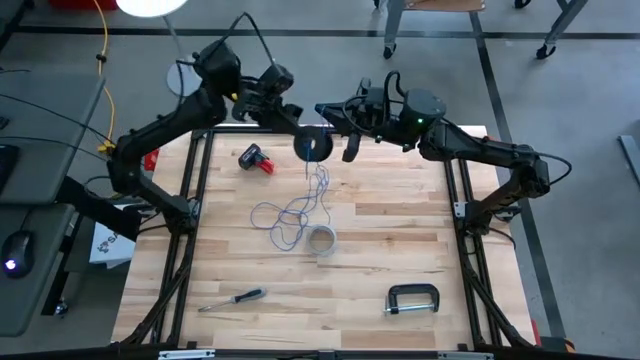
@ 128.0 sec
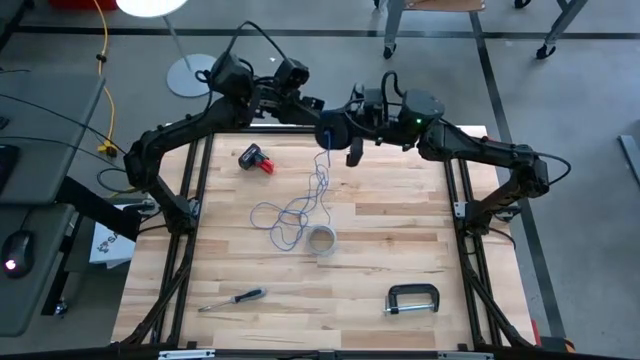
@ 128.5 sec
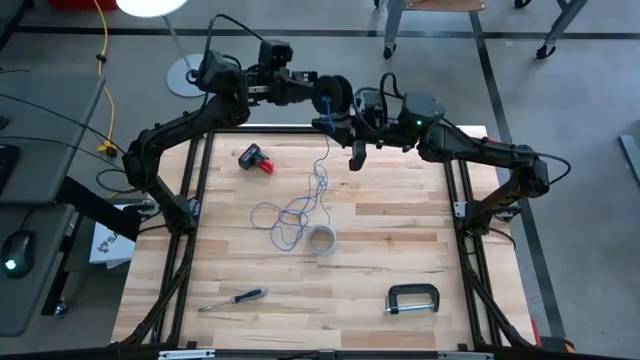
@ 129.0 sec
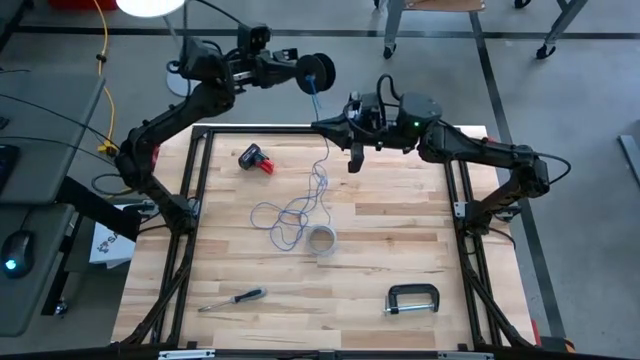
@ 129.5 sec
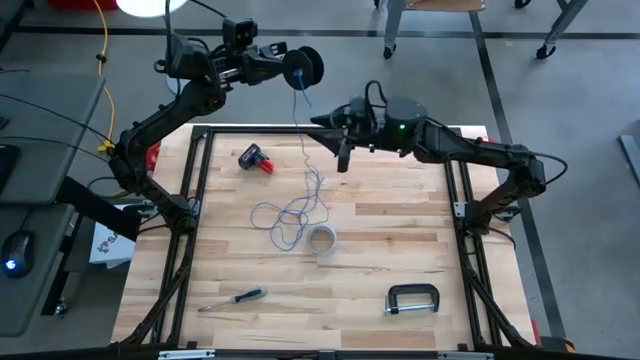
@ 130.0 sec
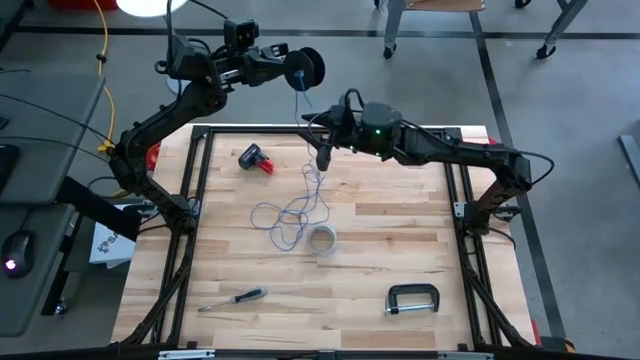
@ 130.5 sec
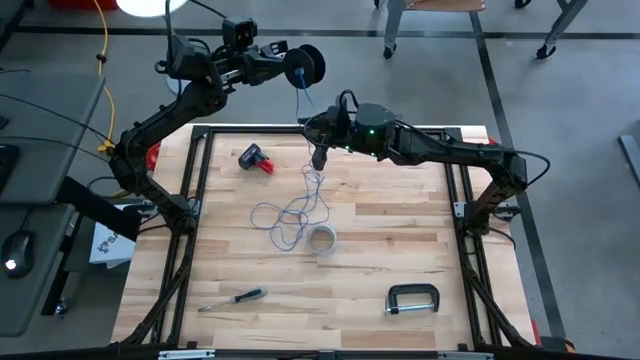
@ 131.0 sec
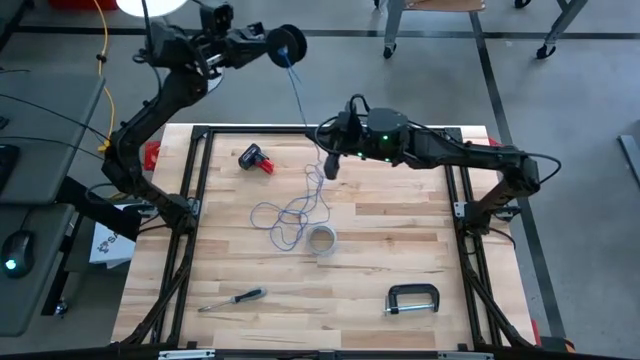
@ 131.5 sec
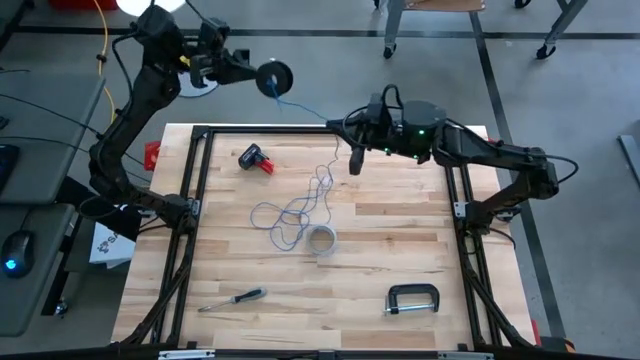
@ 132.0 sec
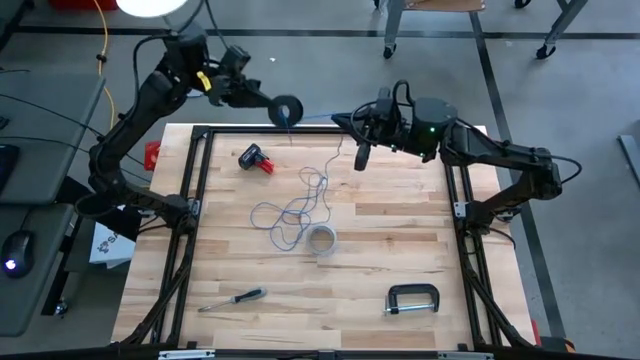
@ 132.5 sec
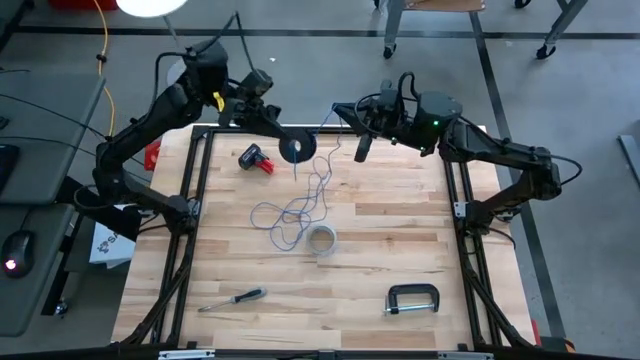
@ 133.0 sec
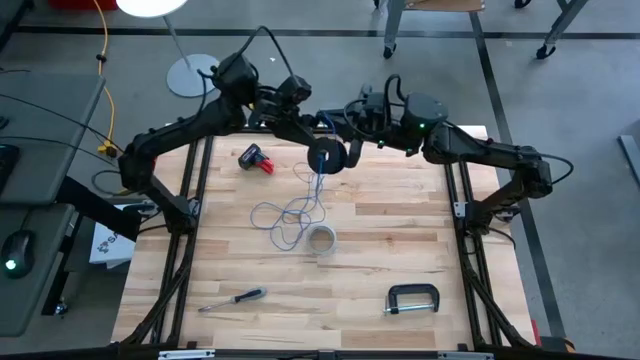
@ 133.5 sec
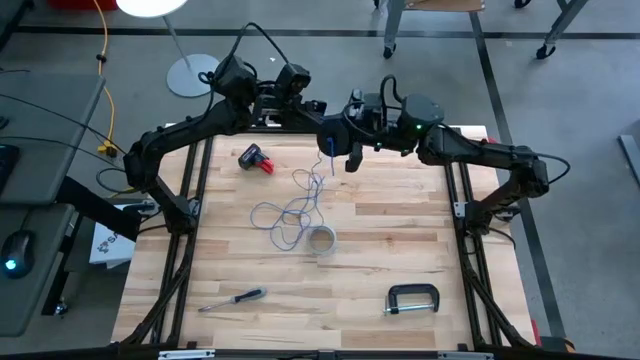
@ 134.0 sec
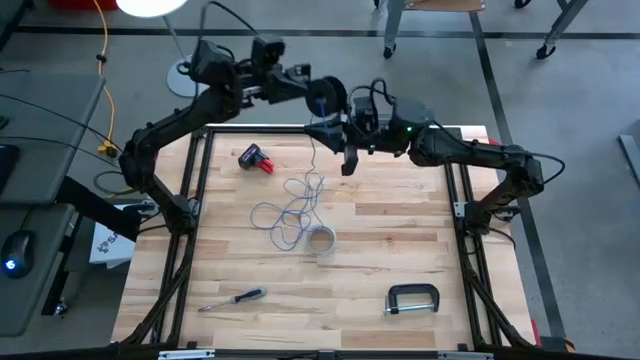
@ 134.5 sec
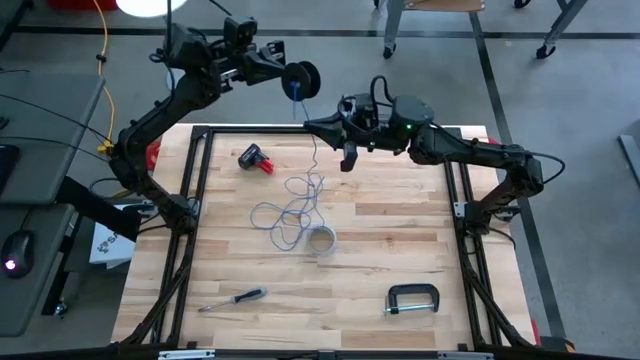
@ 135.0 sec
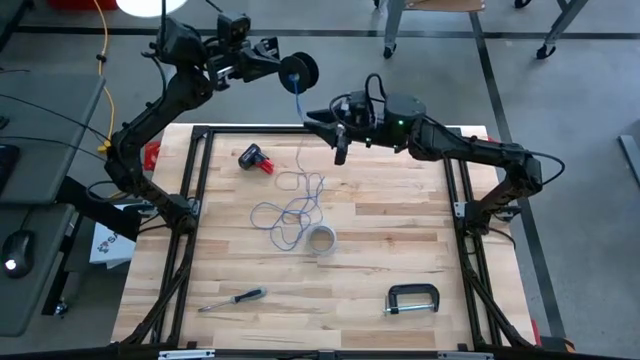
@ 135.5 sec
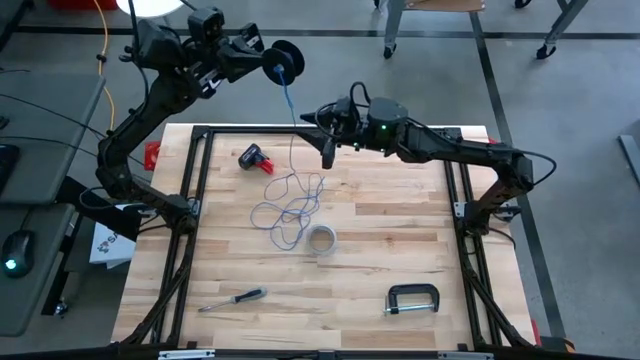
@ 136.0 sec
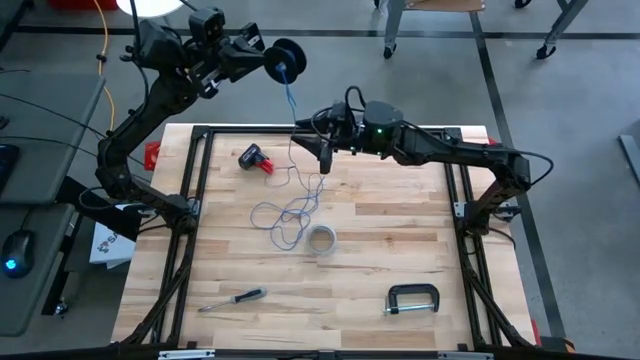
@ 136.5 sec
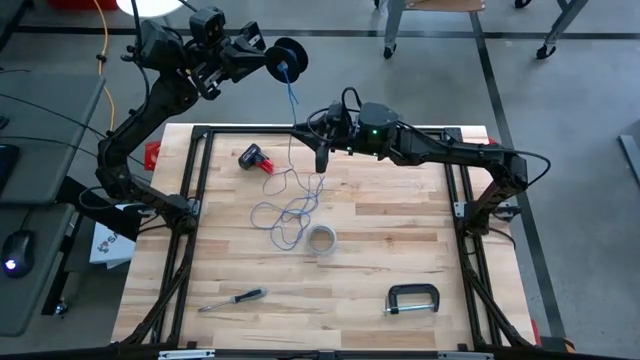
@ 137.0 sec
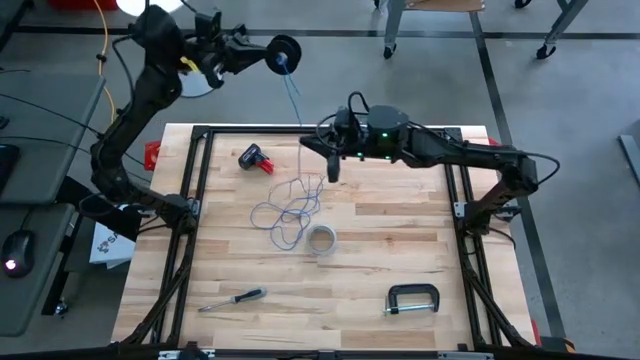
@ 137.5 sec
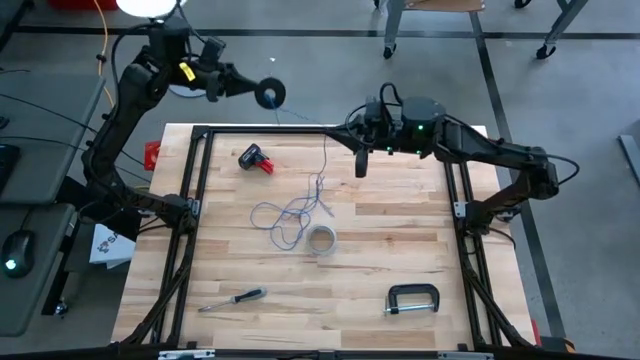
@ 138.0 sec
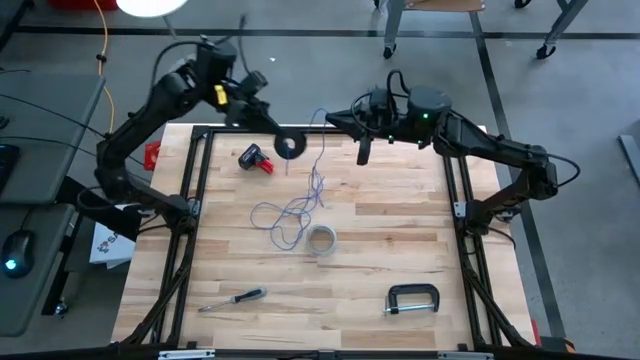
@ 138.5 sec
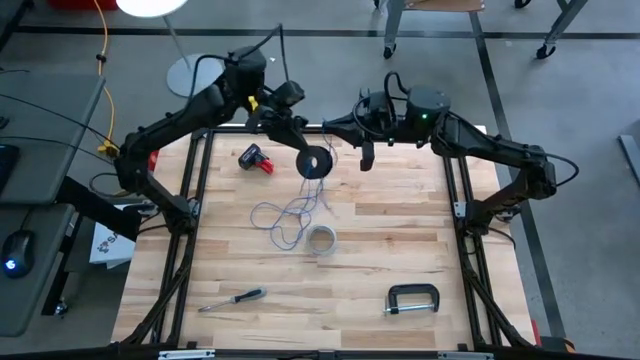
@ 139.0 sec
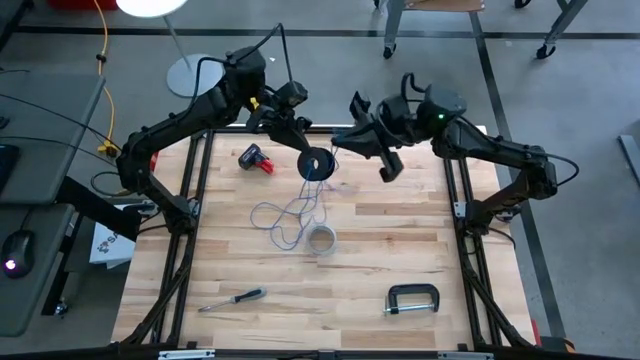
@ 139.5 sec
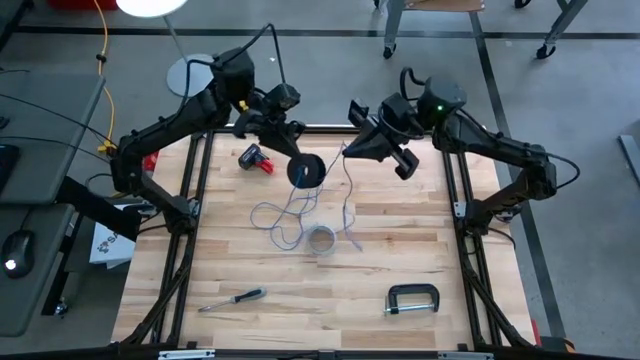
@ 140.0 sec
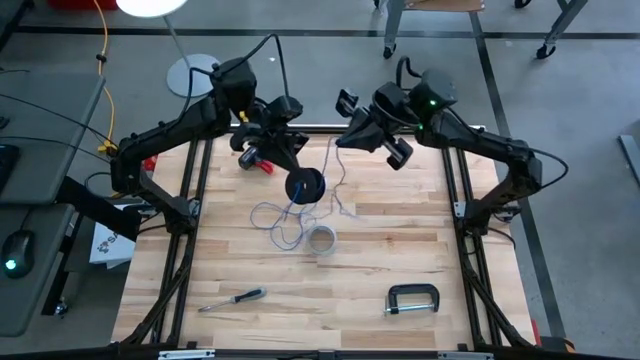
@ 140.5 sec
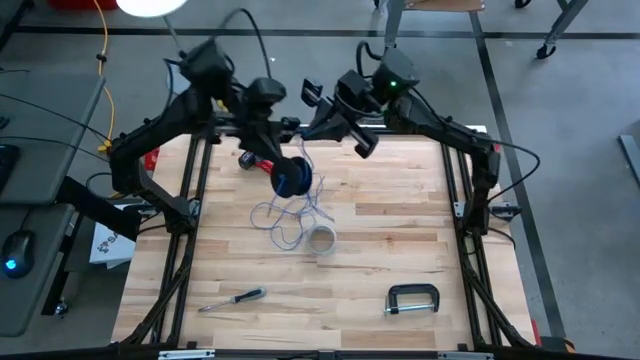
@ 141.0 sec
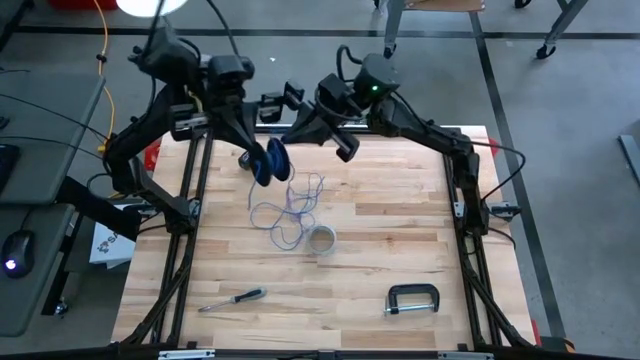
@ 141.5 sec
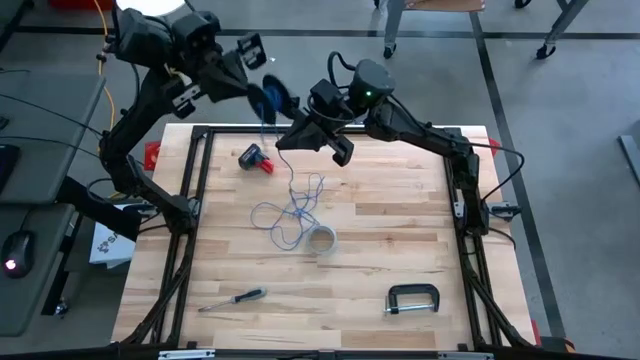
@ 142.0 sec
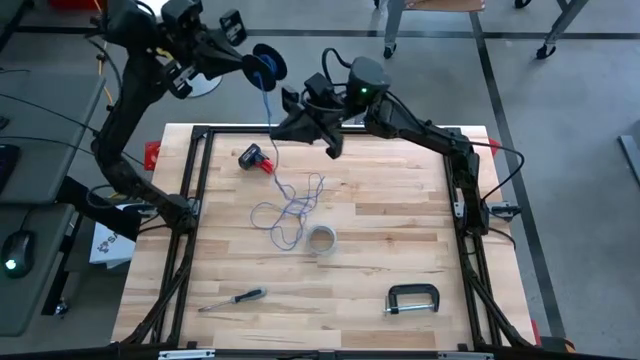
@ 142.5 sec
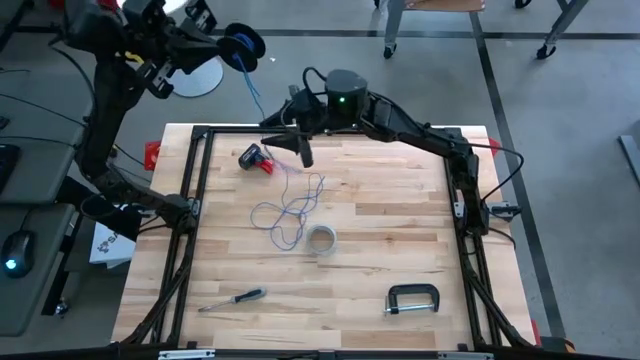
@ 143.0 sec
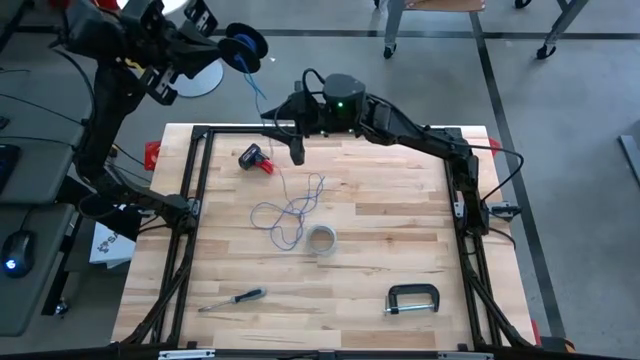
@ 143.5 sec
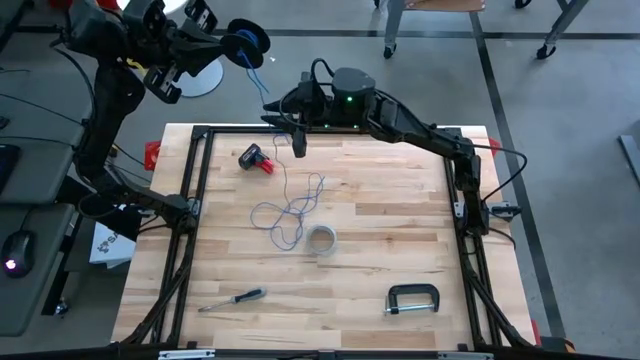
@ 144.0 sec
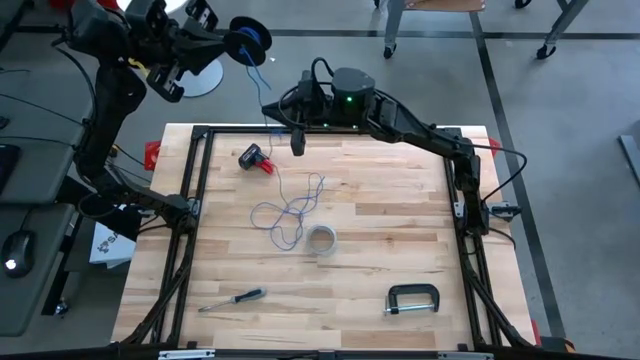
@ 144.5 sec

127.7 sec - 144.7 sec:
Task: Coil cords
Coil the blue wire on the spool

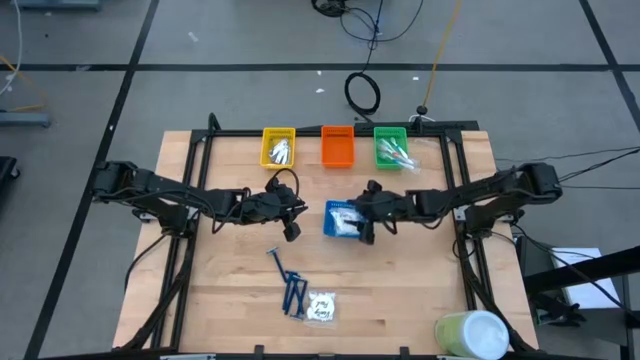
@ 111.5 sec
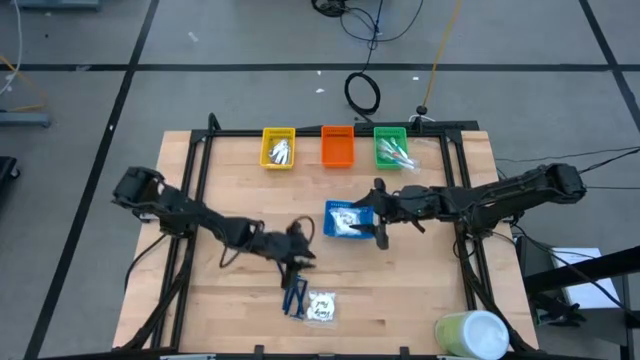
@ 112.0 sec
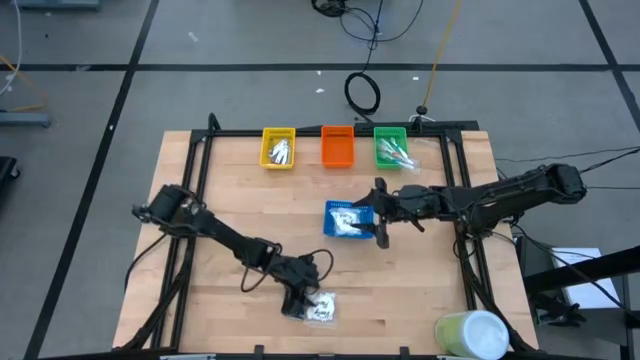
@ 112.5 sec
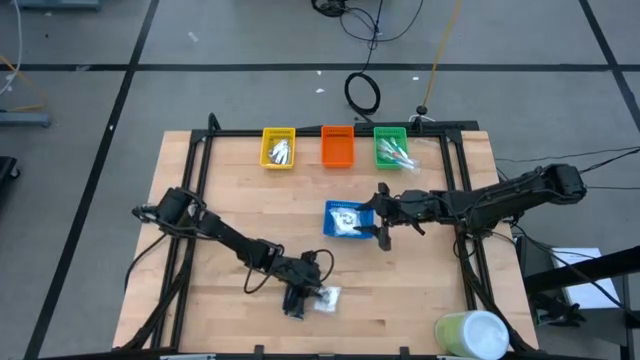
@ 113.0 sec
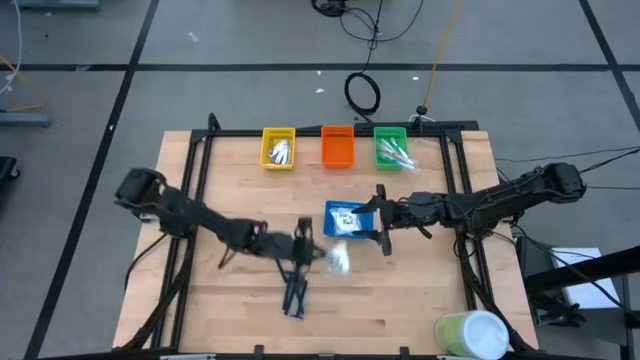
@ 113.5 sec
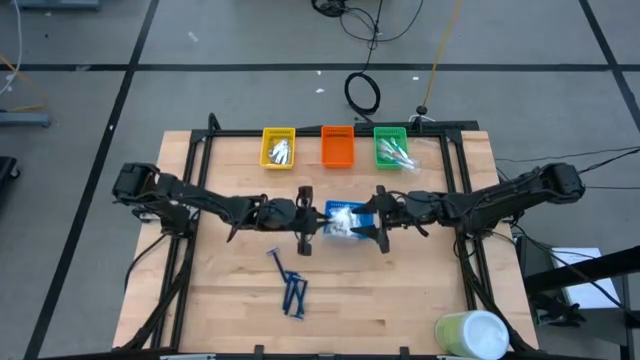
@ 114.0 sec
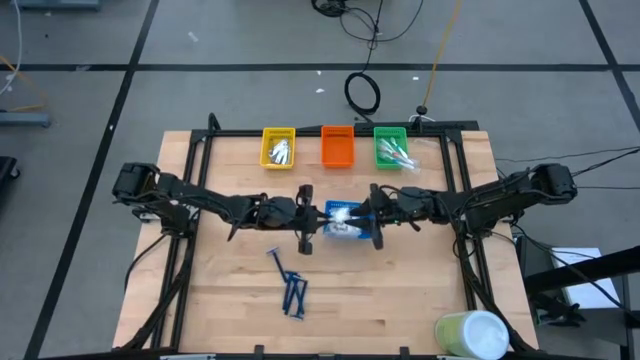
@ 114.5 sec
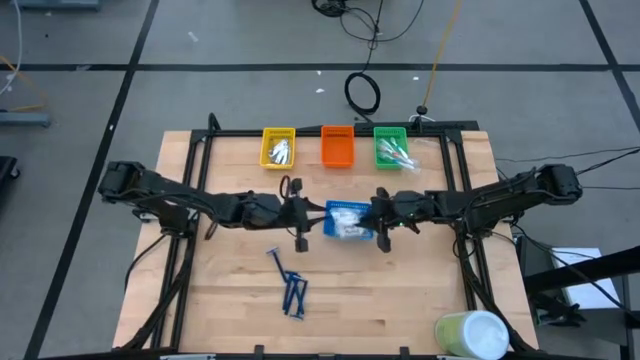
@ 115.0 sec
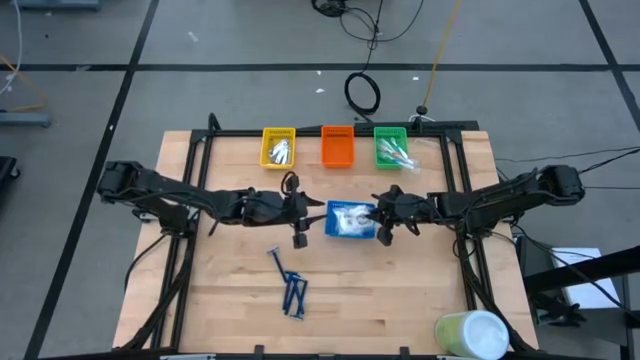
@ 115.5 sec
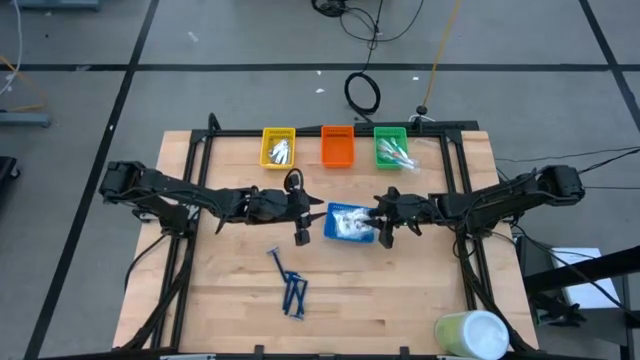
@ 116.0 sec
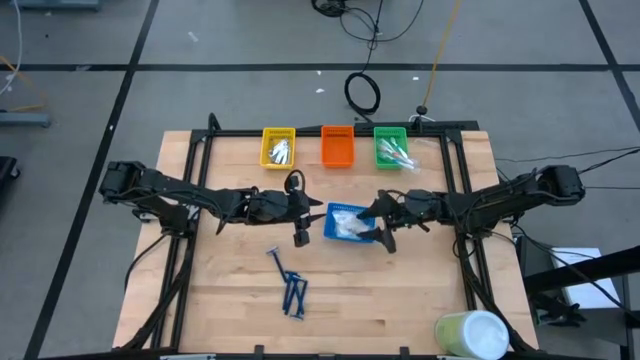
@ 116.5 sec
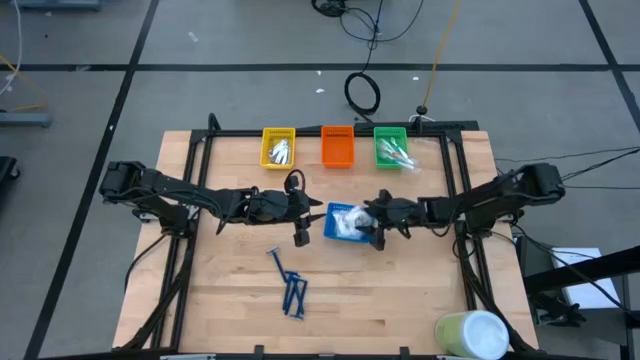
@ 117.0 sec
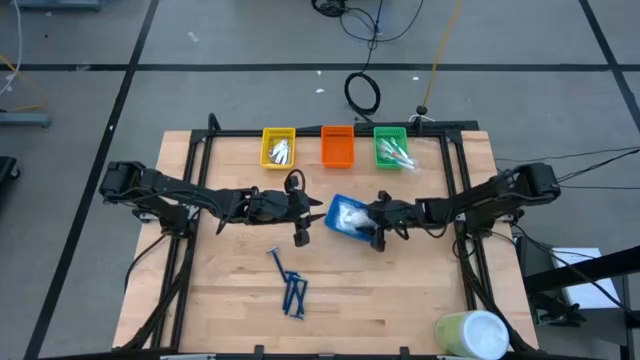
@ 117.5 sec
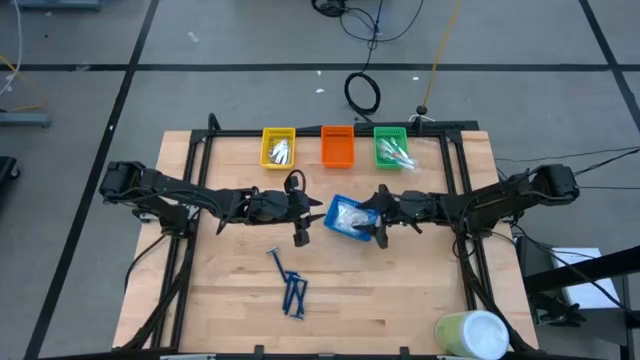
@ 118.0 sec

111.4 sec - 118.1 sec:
Task: Pick & Place Travel size toiletries
Put the white cotton pack into the blue basket
